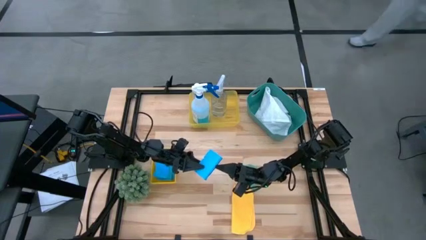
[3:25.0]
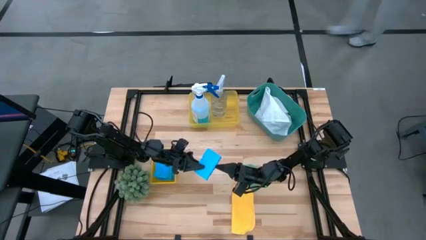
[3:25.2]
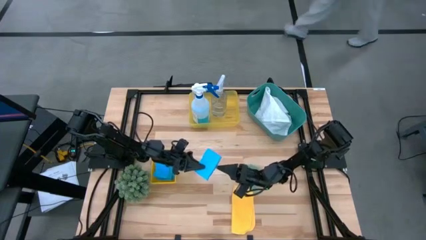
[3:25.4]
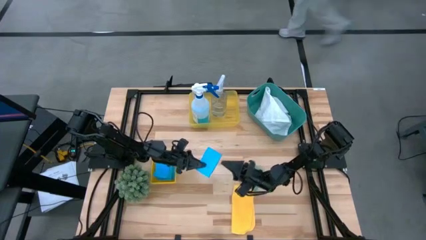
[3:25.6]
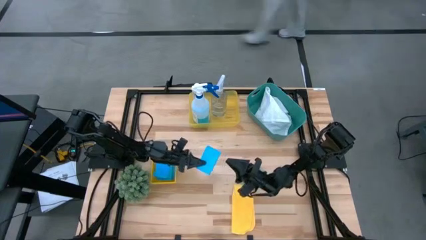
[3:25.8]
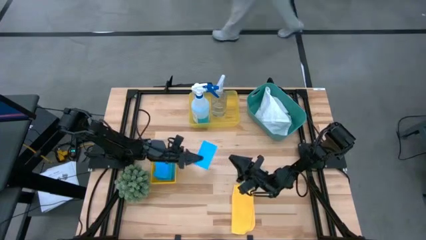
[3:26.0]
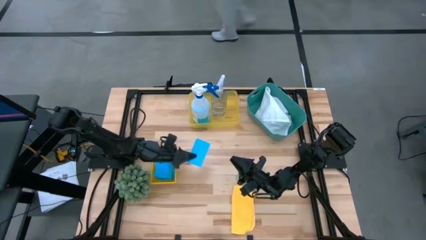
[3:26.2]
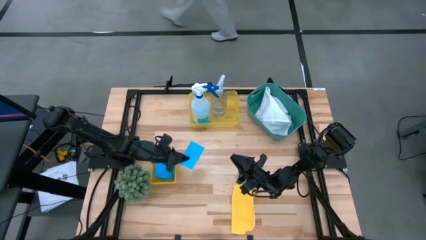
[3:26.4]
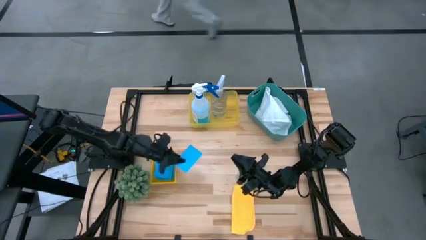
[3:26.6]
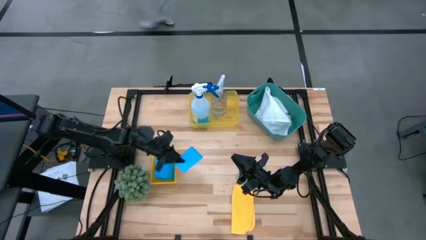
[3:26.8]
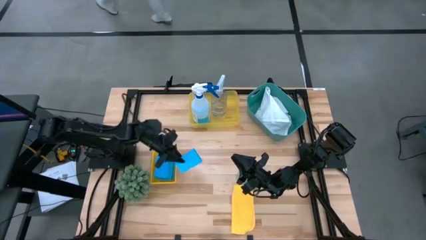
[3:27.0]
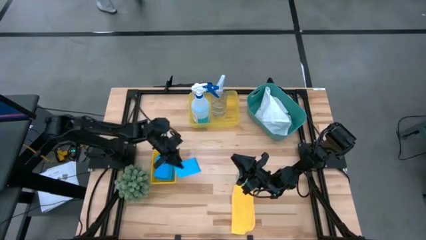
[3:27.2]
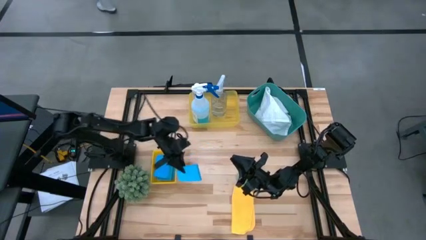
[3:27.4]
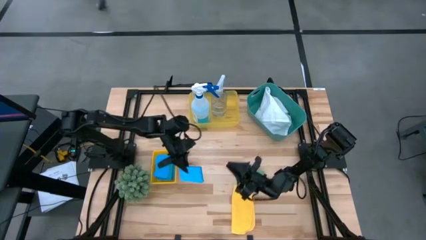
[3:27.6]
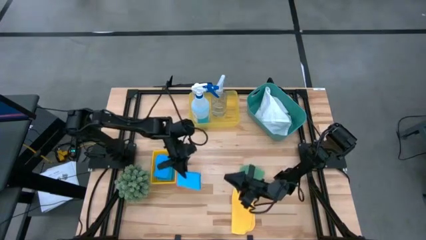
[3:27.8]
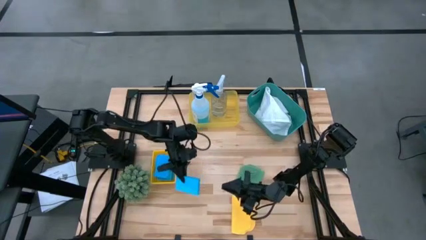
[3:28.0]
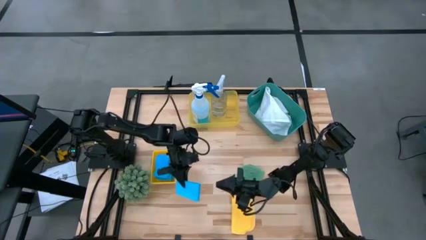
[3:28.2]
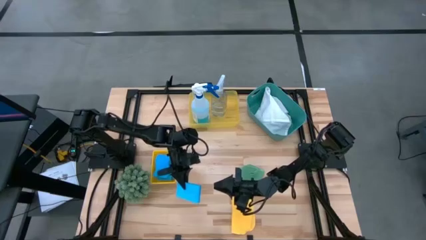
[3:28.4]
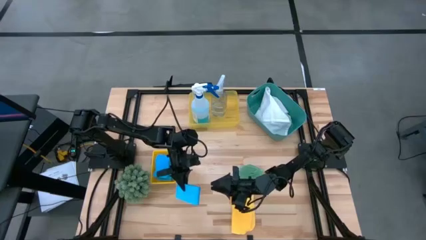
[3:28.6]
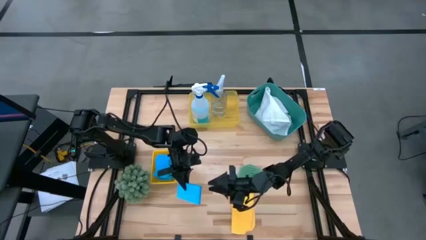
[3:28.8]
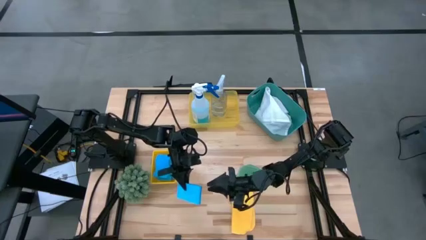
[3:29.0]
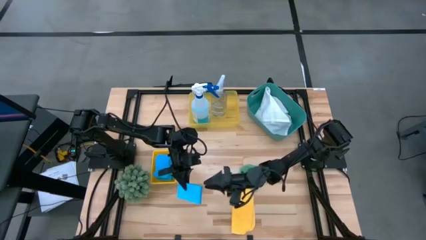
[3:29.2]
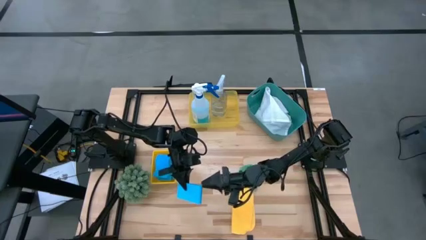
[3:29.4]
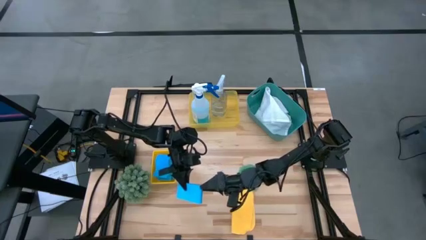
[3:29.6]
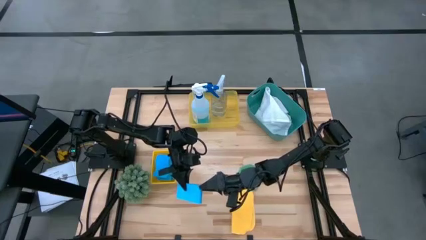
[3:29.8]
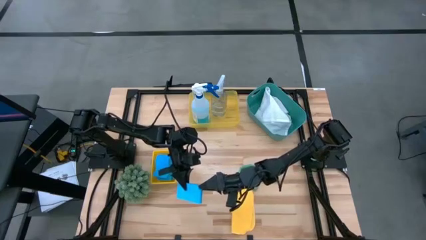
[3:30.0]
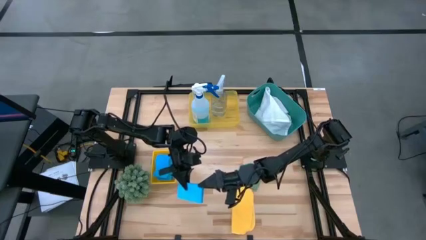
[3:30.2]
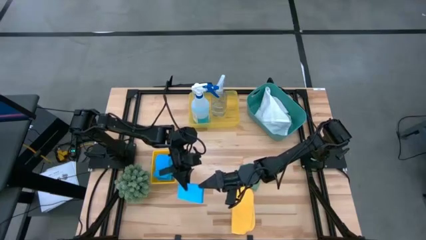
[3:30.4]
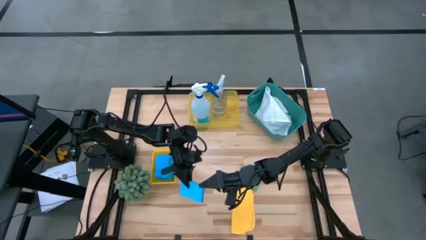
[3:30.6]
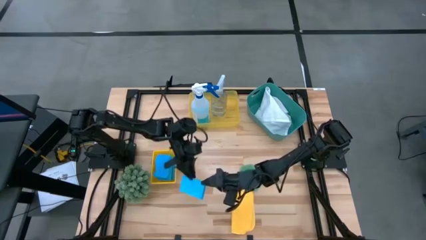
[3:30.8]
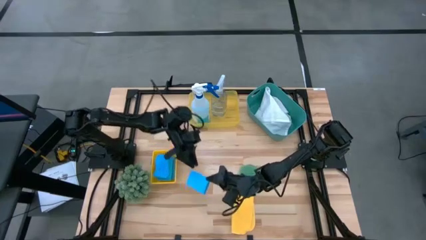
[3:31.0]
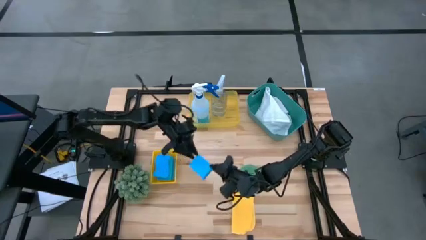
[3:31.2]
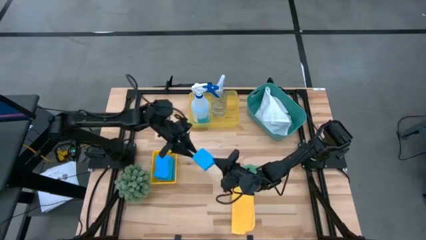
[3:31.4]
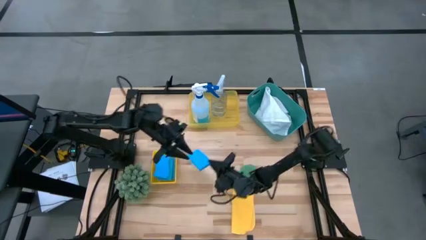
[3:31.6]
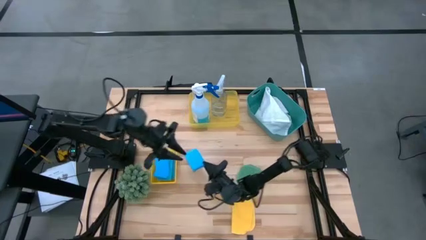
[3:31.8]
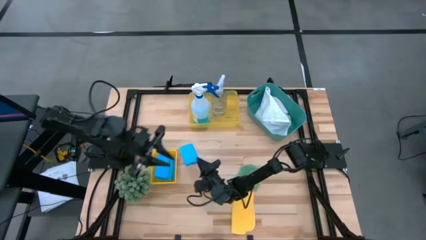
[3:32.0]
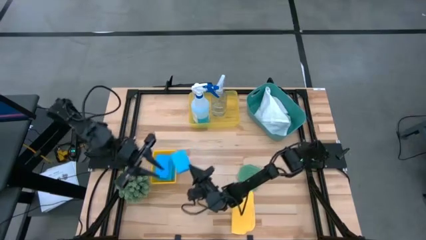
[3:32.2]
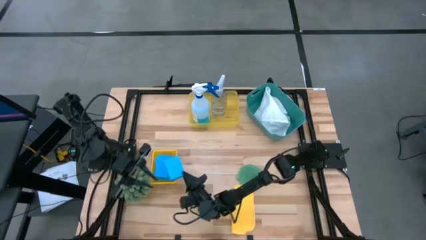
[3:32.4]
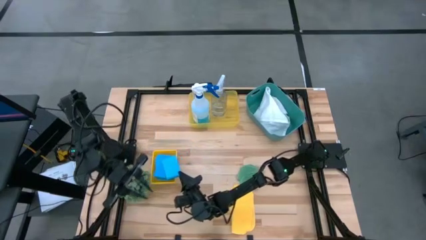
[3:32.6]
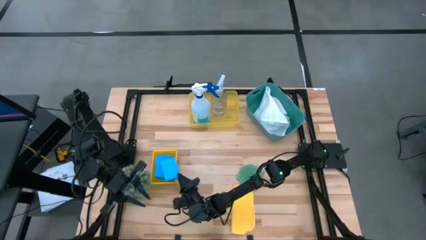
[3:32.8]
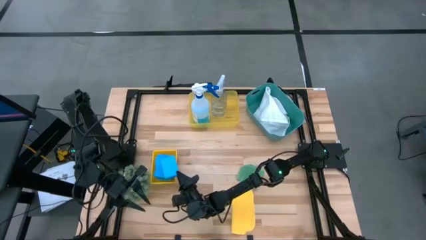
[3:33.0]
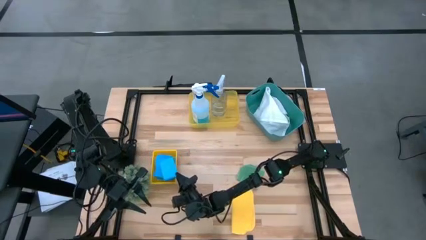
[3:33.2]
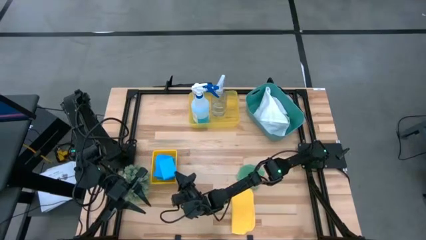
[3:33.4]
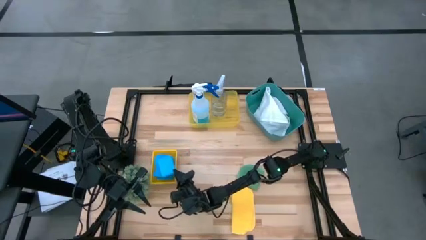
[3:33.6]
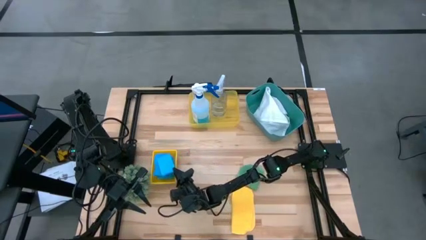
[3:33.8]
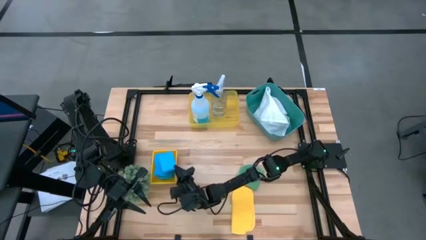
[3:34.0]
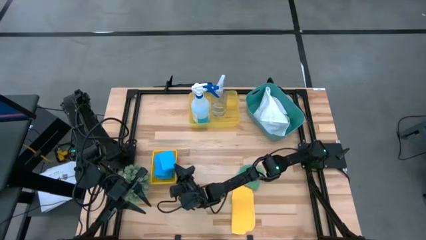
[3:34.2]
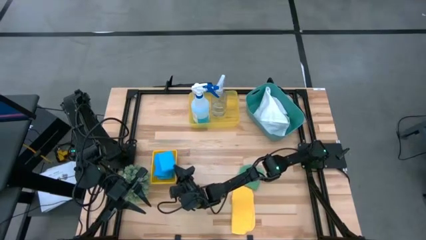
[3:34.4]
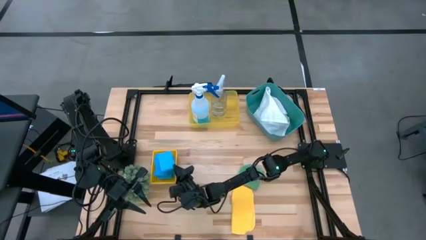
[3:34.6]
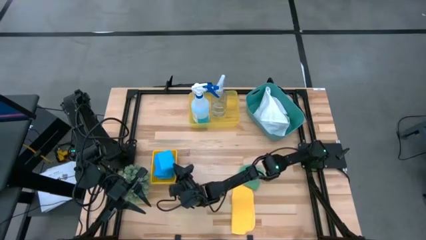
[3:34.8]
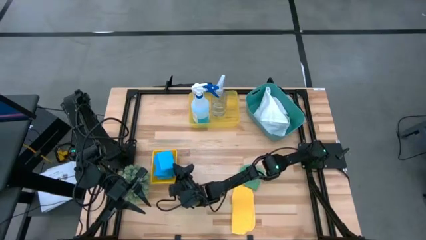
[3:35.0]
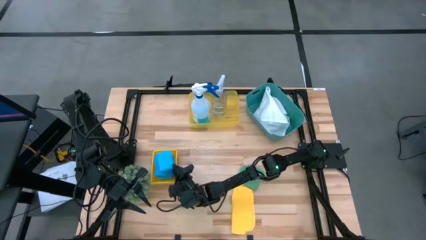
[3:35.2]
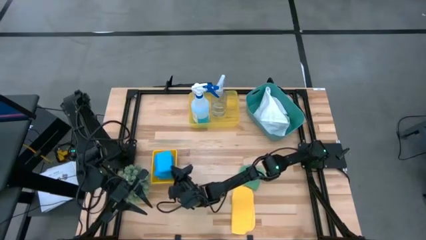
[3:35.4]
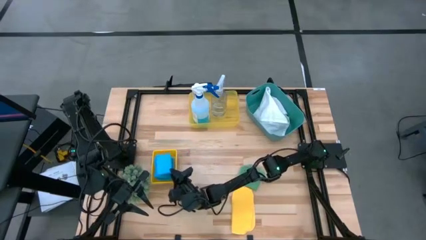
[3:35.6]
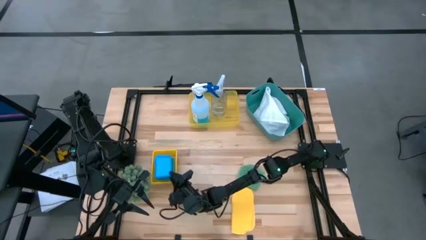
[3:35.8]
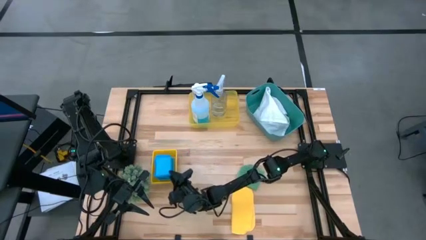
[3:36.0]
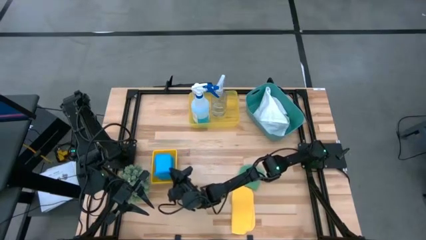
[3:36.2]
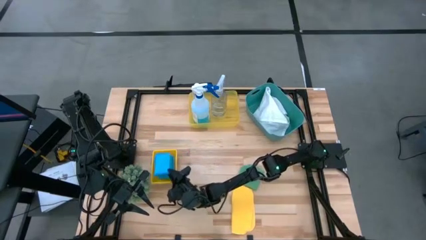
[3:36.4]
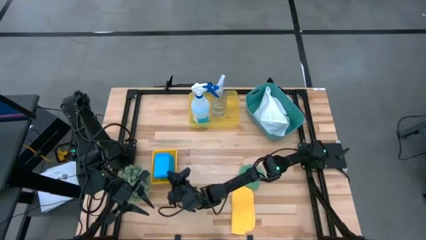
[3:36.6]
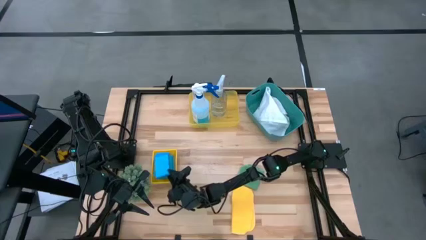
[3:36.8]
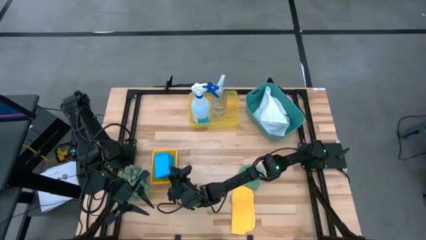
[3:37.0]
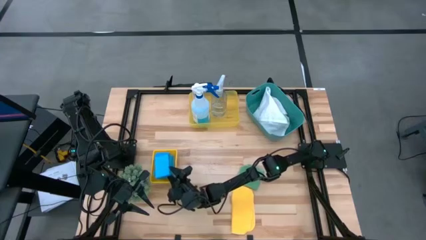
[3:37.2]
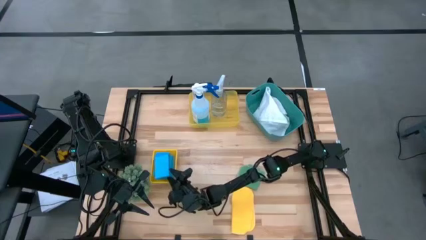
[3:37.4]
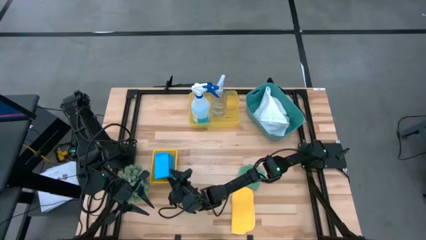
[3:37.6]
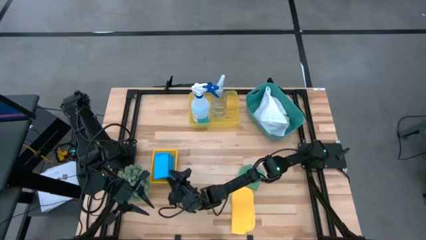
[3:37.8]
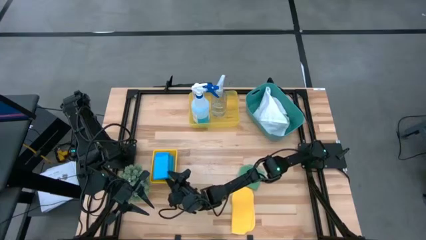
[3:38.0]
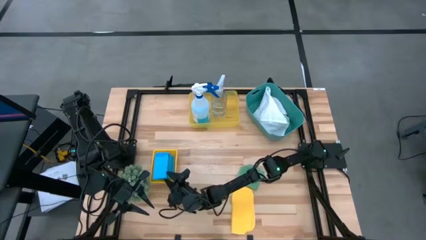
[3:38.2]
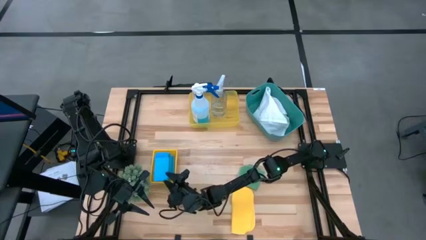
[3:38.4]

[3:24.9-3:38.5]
Task: Pick & Place Kitchen Items
Put the blue sponge into the bottom yellow bin

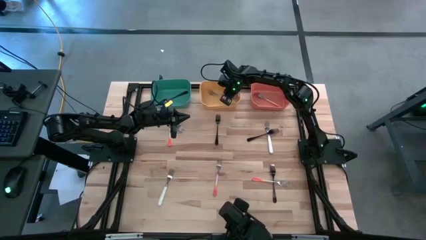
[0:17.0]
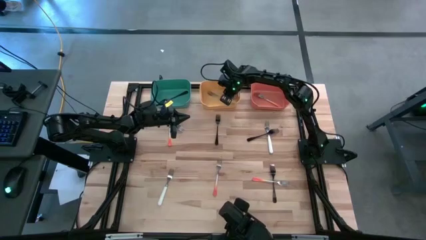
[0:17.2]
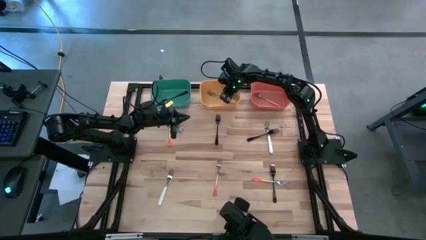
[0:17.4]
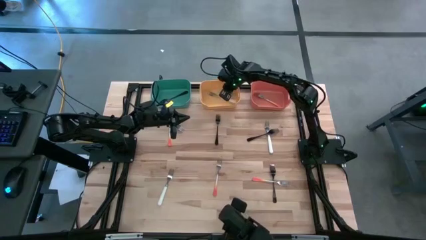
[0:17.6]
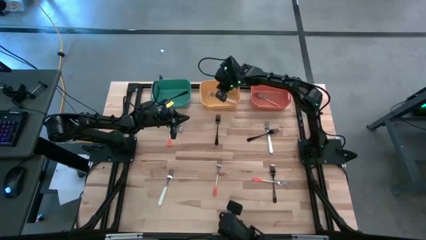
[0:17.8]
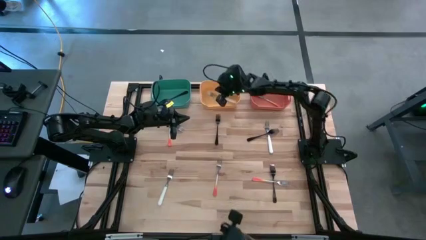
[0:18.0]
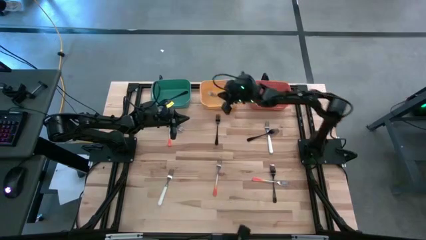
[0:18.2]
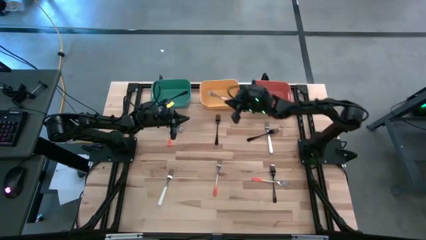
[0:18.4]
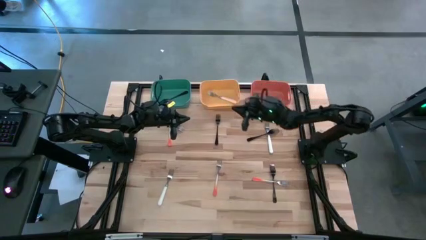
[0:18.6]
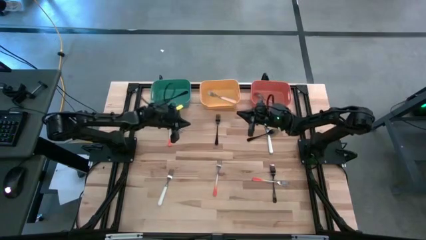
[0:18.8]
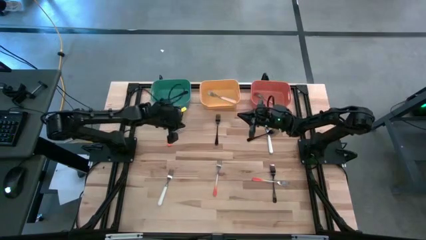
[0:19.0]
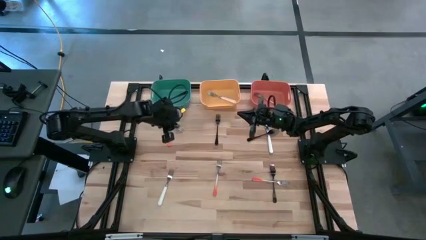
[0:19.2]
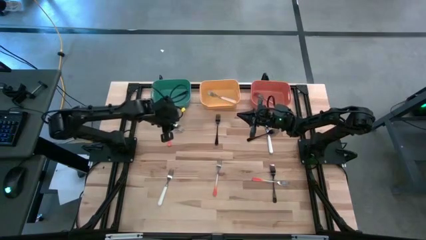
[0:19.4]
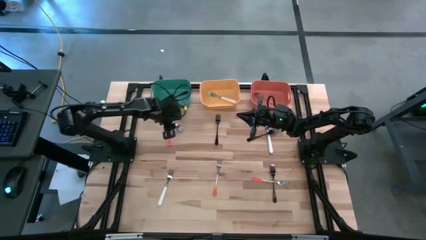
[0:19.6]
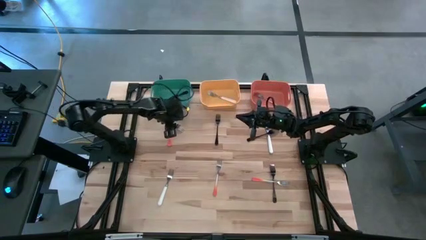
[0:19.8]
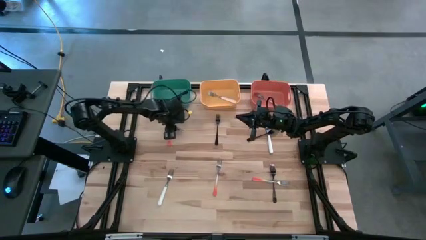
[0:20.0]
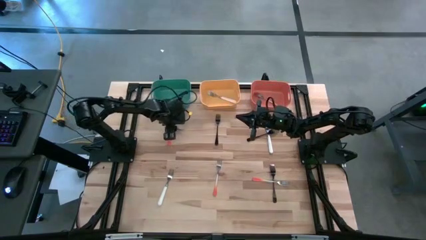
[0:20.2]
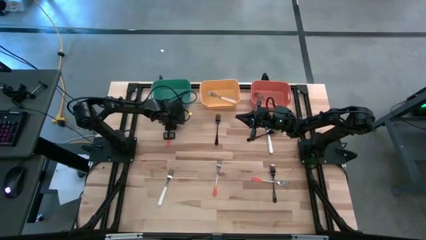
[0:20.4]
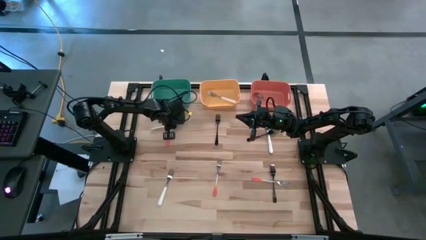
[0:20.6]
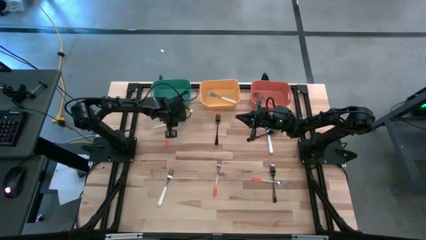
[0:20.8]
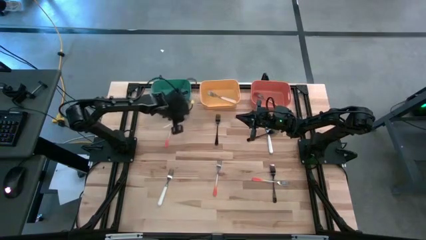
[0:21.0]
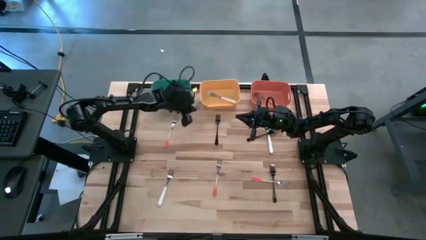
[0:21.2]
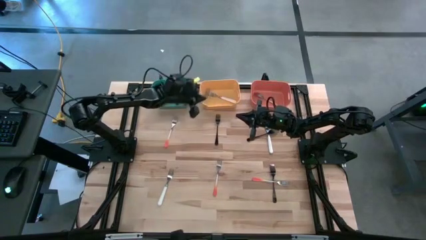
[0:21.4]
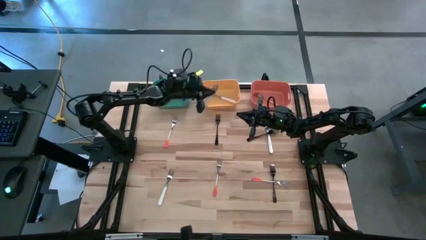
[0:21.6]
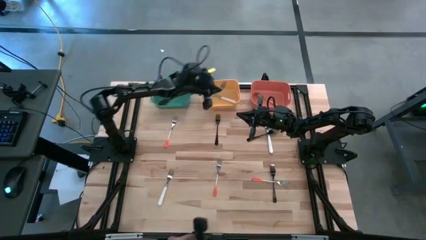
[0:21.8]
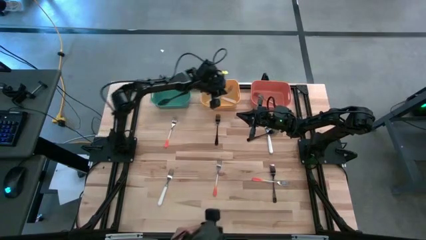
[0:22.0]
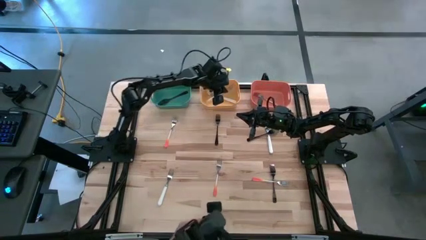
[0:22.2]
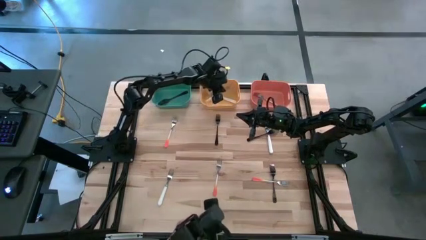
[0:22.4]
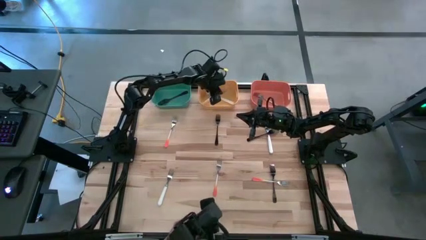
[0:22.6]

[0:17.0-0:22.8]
Task: Sort silverware by color (type)
Put the white fork into the yellow bin
